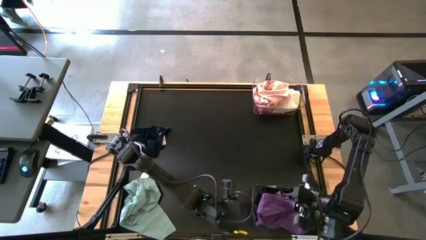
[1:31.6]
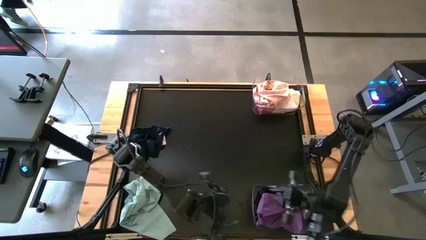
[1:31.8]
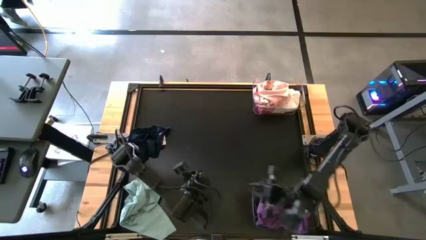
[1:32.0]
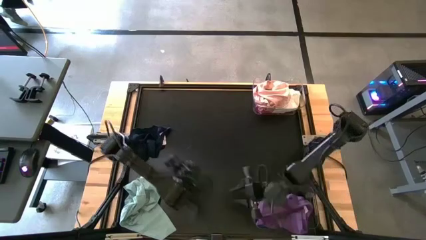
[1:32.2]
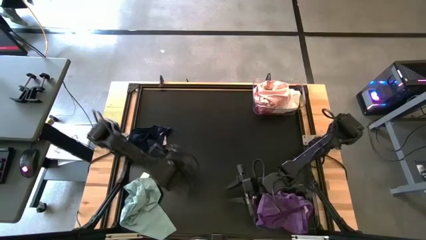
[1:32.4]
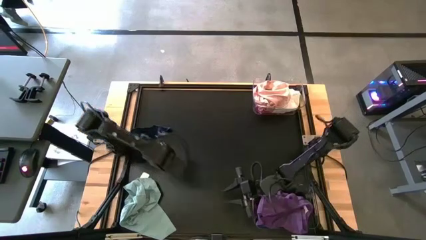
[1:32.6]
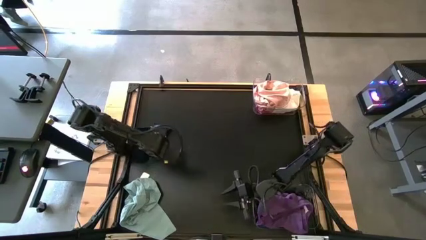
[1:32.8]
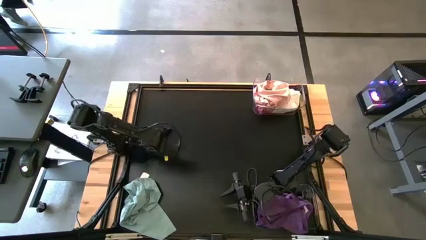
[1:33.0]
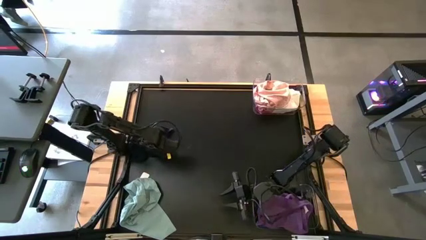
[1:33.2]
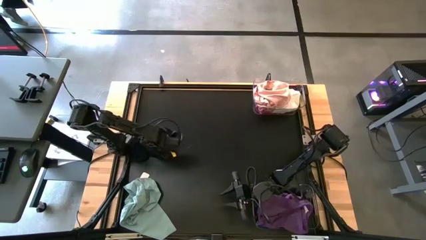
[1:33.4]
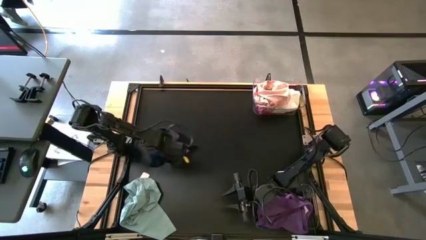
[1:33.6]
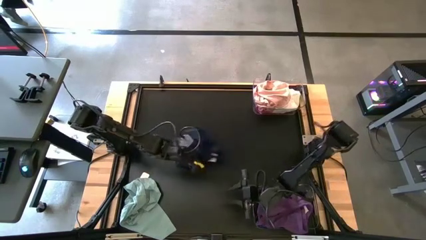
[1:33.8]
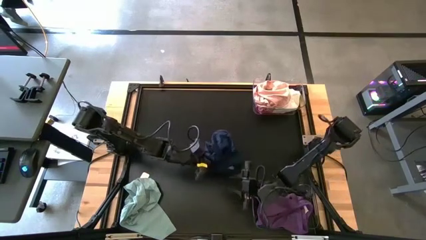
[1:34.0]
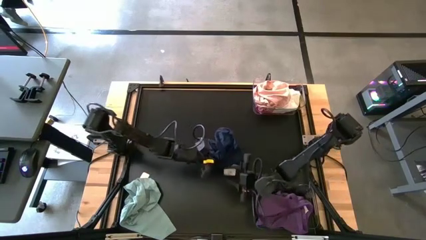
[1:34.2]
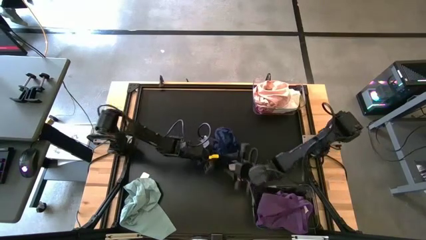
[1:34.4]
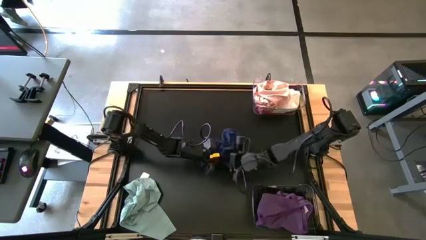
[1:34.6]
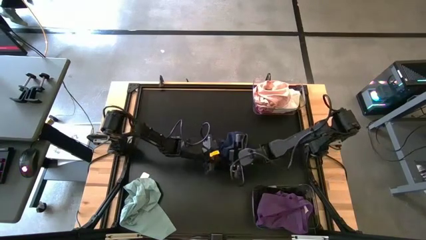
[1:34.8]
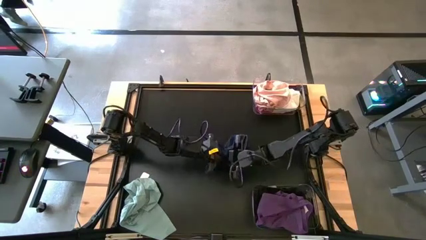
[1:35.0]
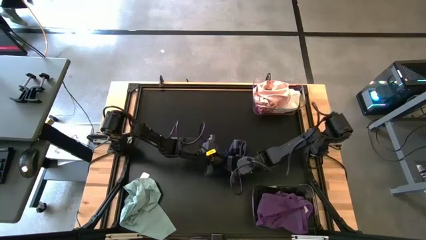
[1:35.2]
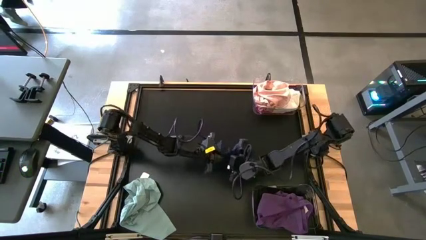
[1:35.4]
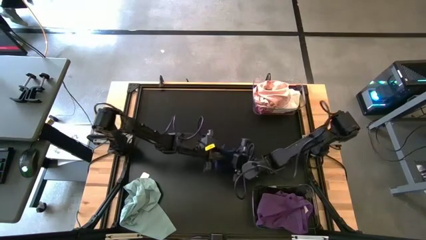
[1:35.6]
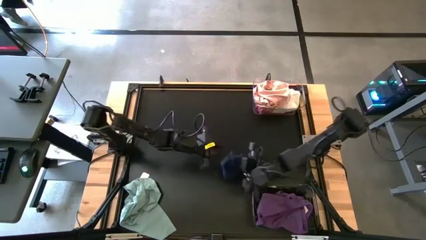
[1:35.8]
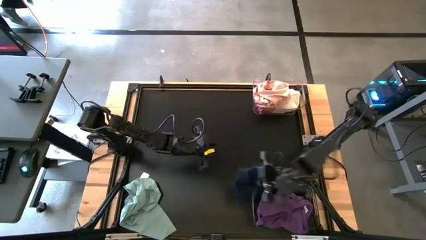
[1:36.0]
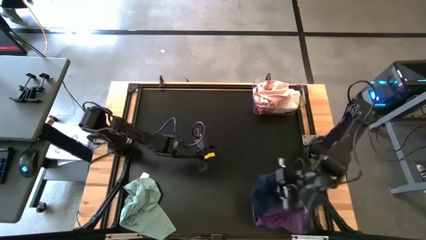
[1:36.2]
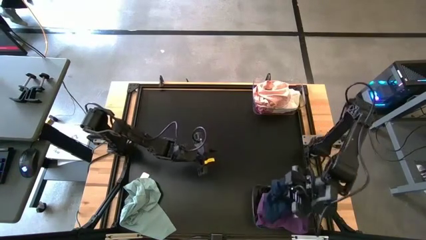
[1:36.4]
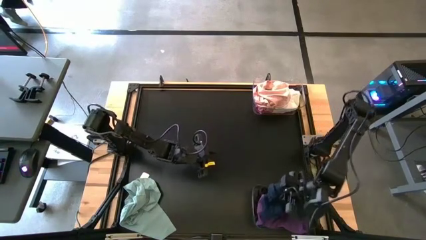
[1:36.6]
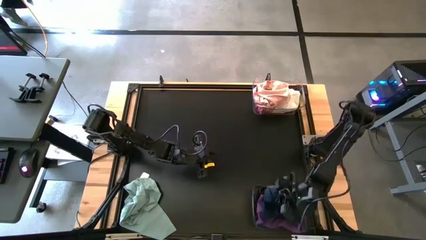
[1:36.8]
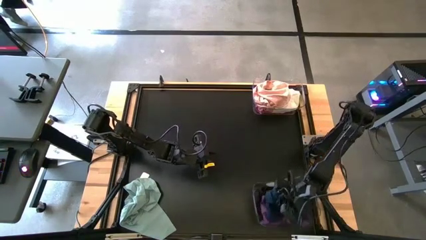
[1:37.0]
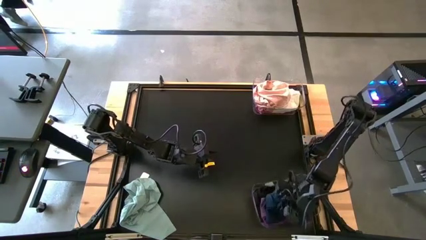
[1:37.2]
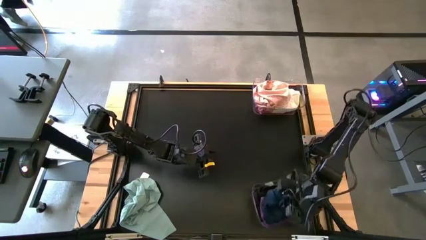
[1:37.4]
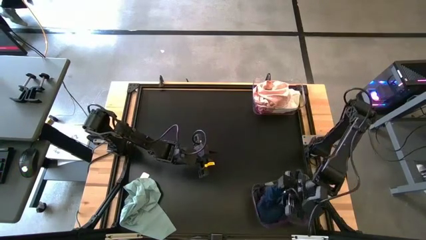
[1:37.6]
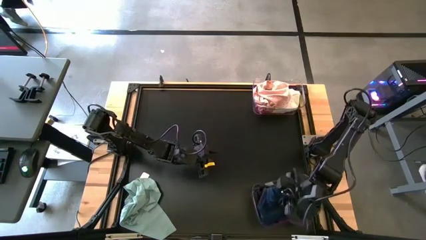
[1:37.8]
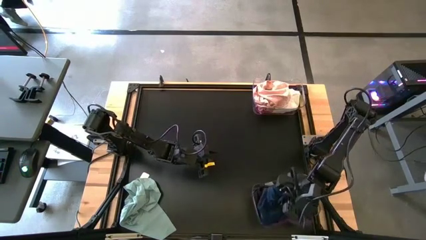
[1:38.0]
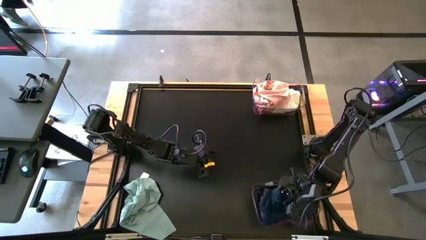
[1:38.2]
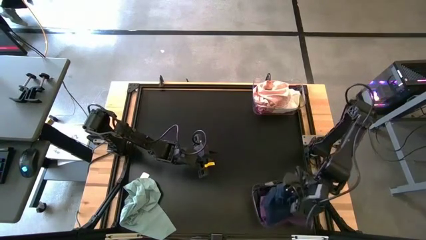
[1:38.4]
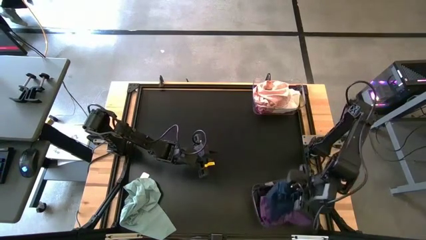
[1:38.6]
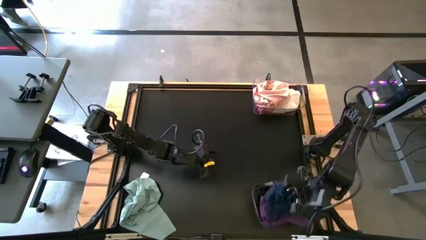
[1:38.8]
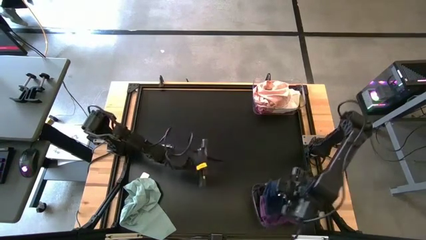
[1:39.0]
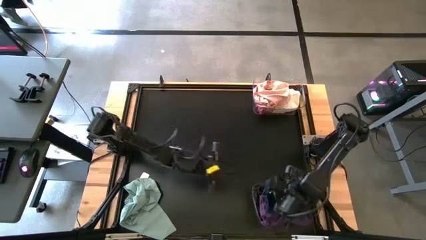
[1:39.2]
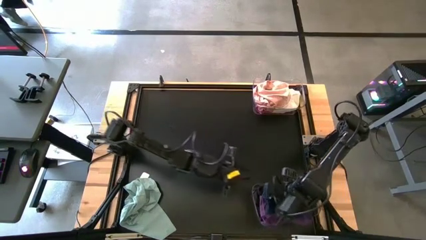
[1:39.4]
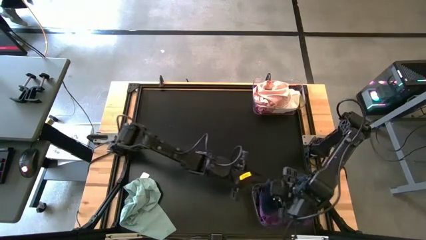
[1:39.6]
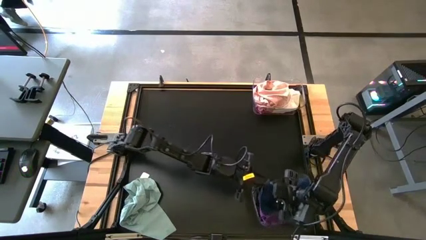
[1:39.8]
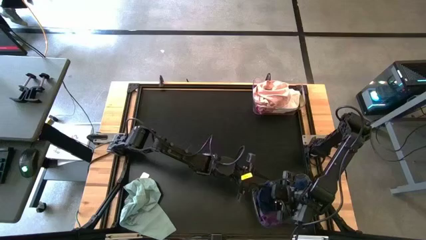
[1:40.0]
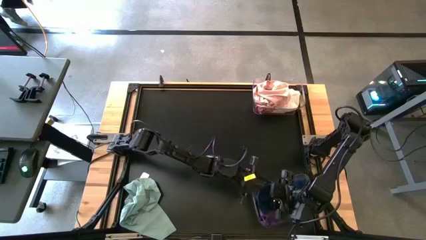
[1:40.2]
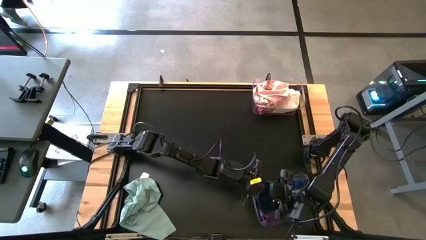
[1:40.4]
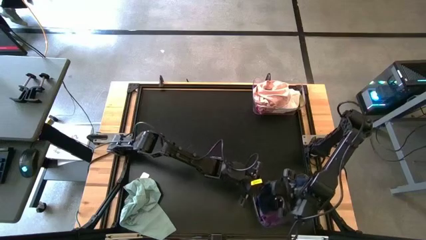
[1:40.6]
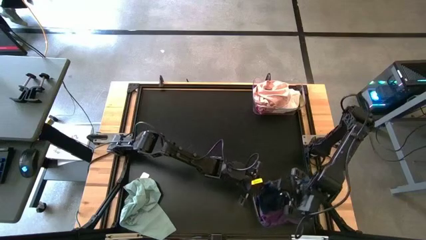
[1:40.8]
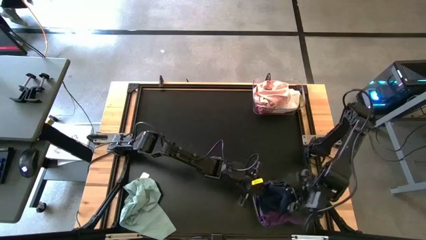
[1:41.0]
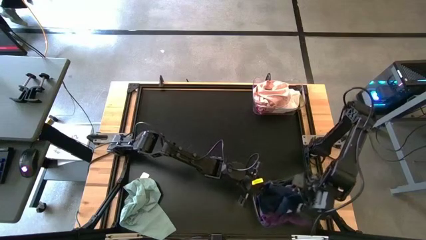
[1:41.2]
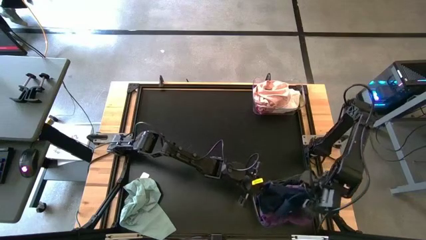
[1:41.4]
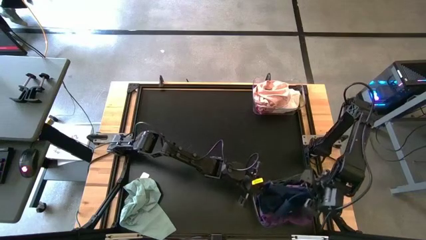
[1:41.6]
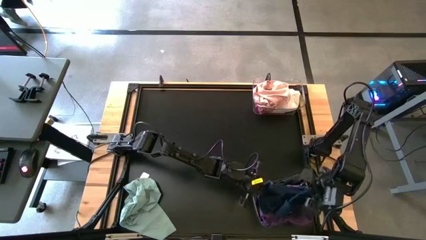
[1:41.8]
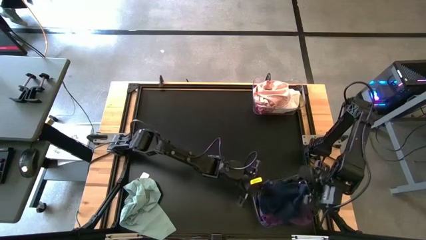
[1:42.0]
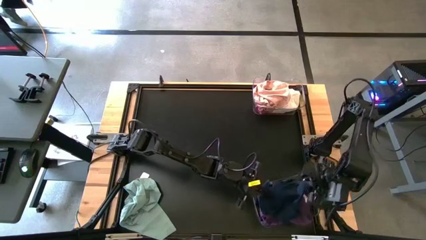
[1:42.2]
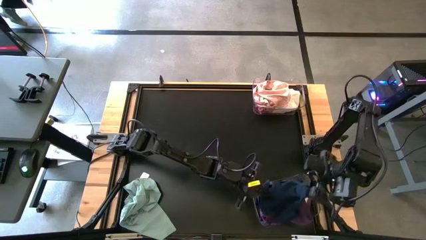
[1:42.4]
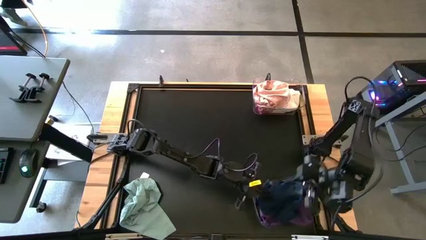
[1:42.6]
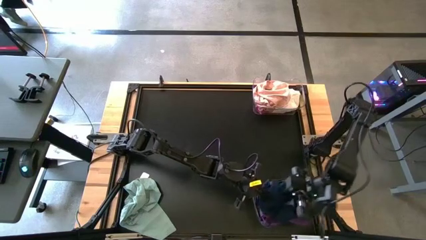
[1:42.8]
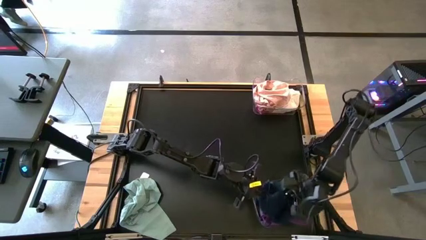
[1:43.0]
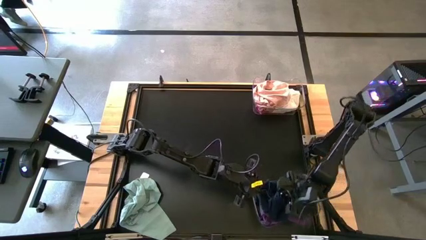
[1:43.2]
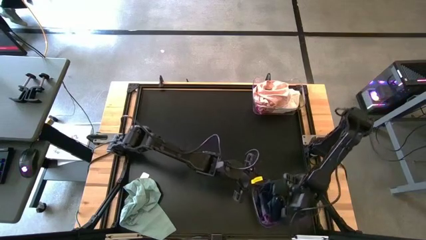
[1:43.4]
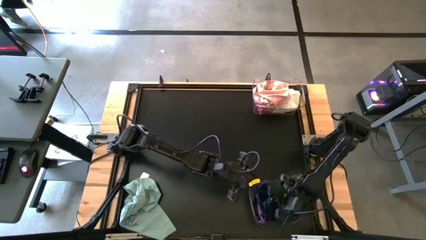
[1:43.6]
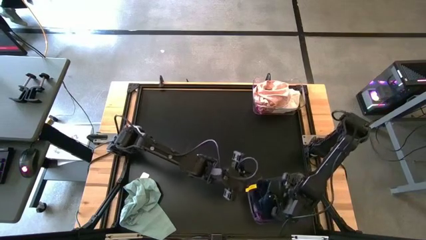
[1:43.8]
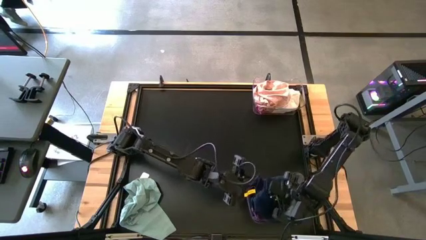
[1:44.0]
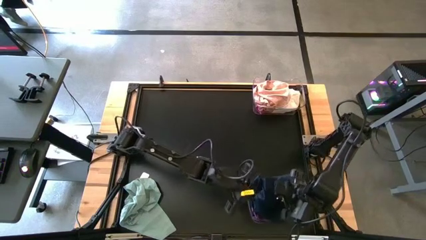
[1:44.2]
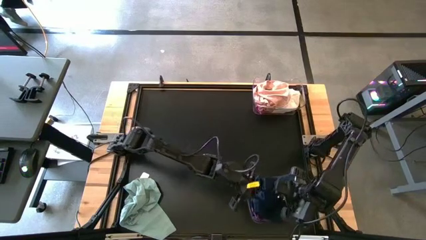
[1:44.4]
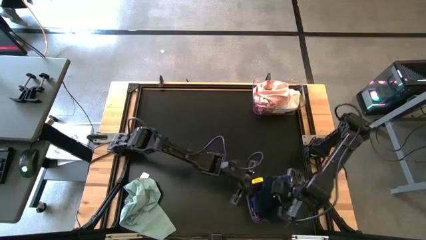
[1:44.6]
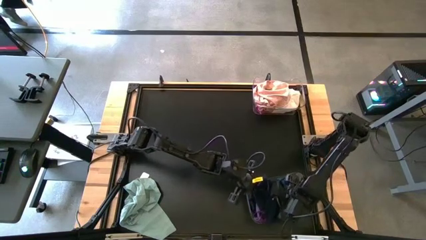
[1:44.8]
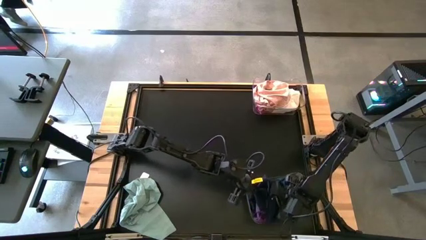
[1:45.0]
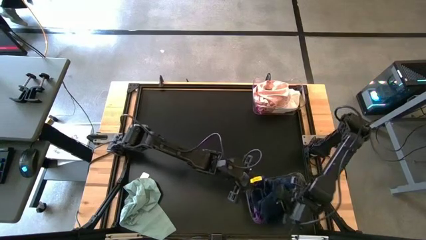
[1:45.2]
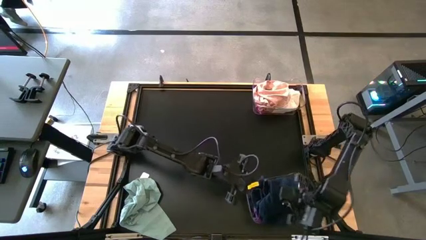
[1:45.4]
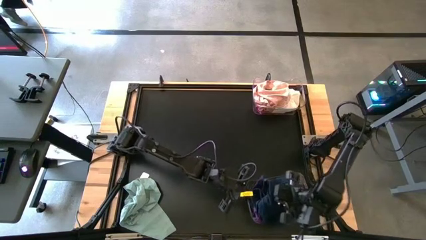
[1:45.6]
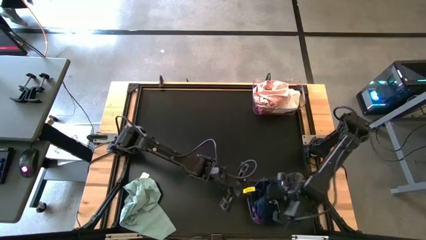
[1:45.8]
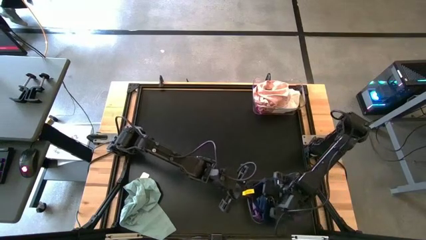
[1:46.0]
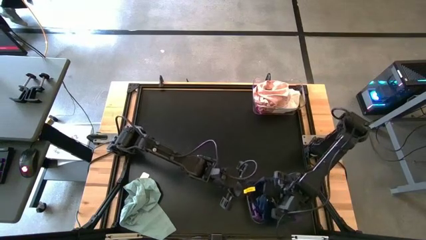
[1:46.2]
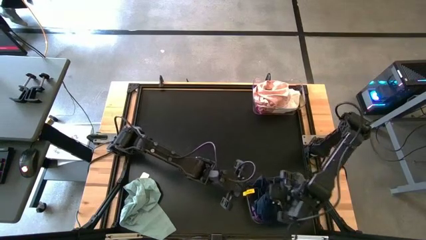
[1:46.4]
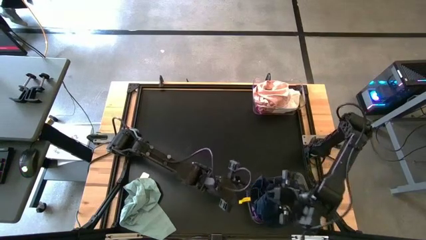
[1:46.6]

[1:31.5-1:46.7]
Task: Sort towels by color in basket
Put the blue towel into the bottom transparent bin
